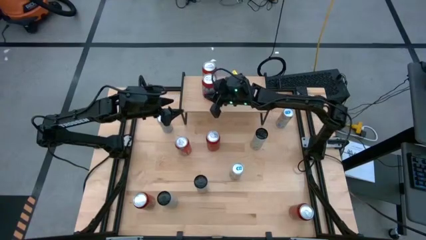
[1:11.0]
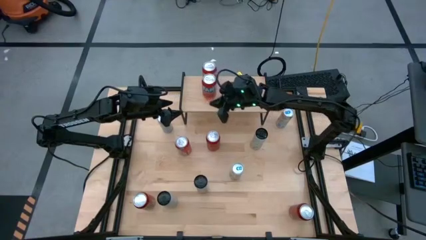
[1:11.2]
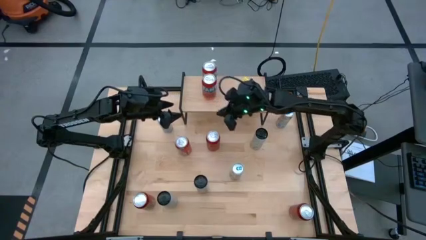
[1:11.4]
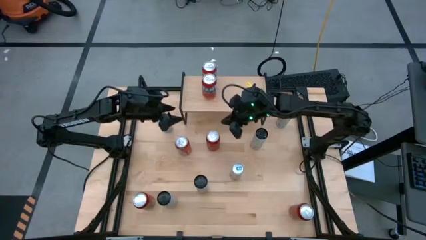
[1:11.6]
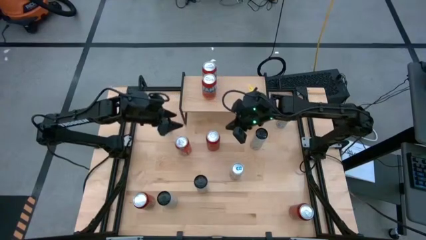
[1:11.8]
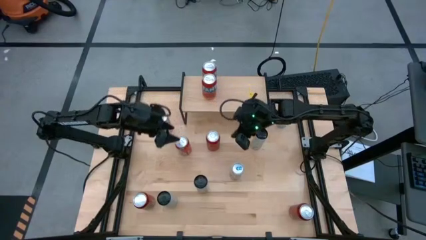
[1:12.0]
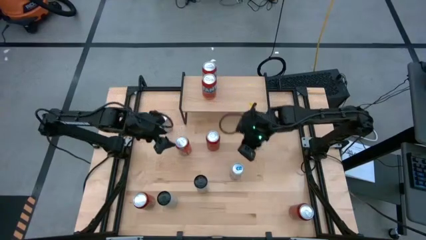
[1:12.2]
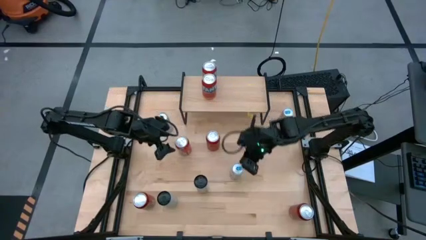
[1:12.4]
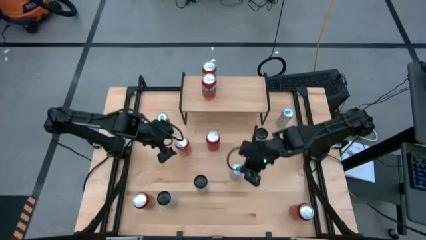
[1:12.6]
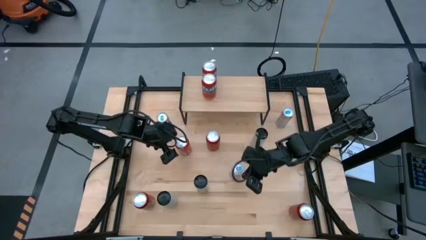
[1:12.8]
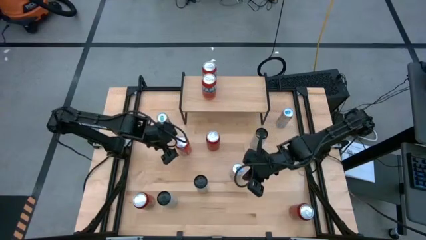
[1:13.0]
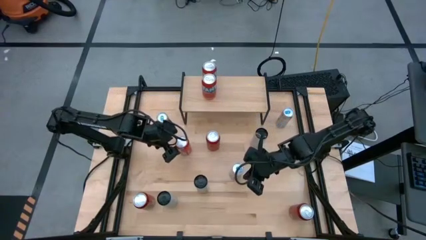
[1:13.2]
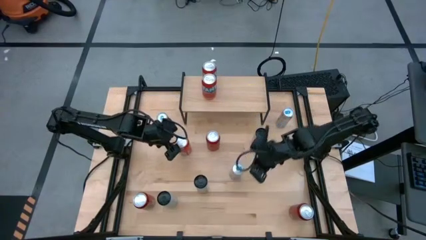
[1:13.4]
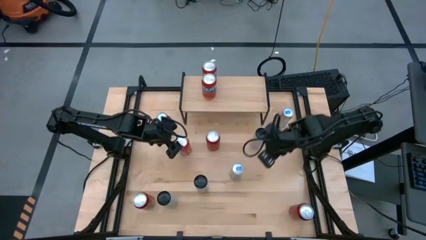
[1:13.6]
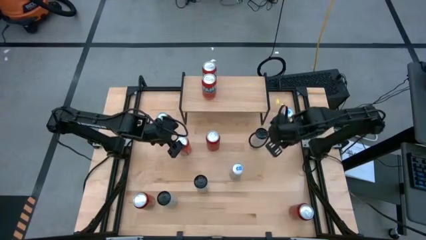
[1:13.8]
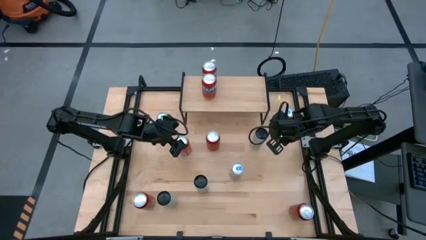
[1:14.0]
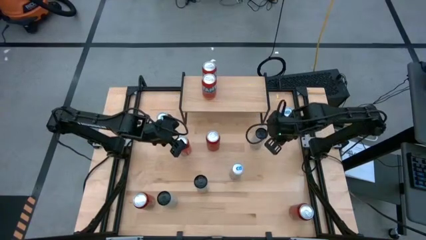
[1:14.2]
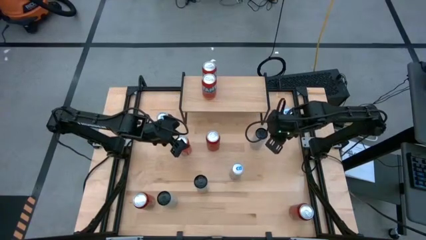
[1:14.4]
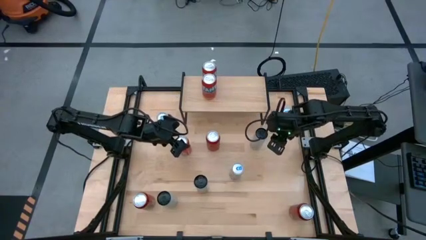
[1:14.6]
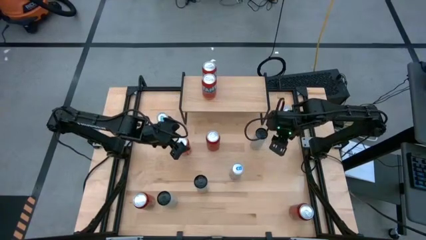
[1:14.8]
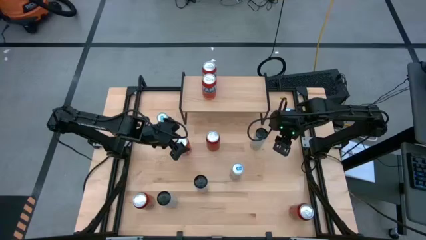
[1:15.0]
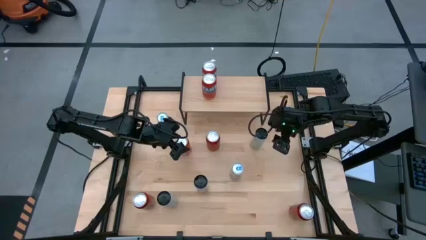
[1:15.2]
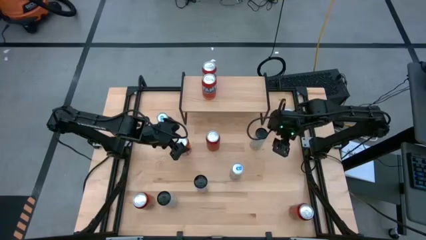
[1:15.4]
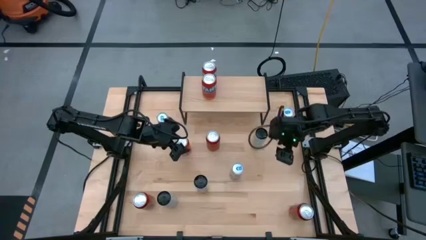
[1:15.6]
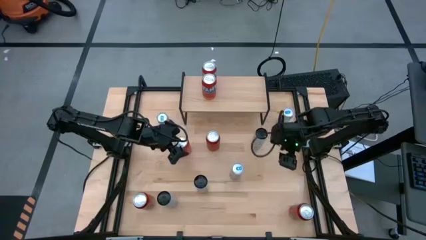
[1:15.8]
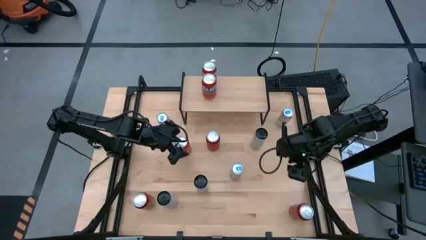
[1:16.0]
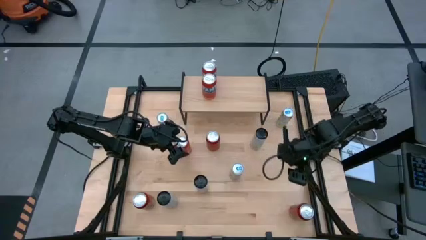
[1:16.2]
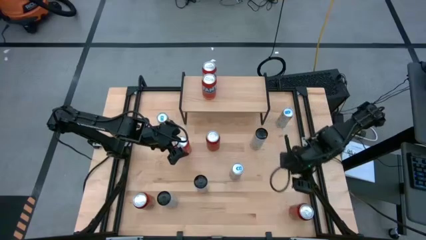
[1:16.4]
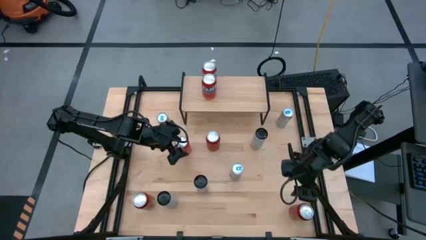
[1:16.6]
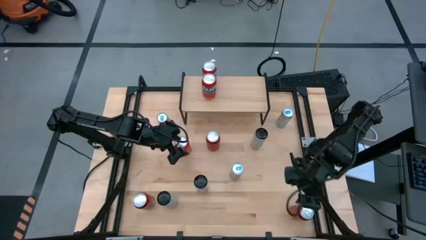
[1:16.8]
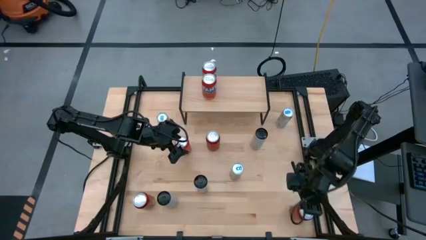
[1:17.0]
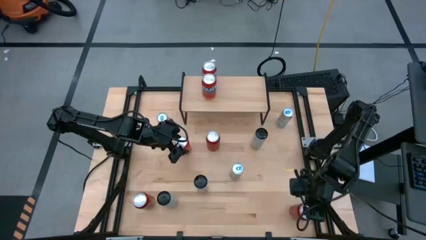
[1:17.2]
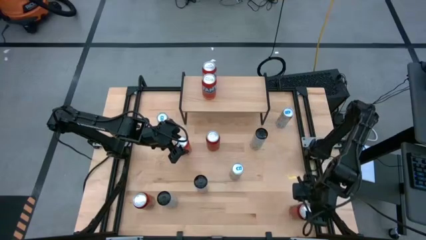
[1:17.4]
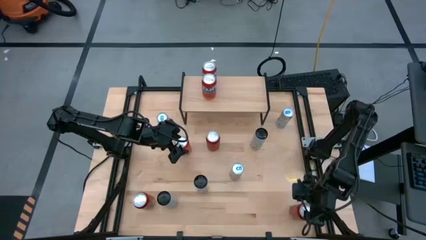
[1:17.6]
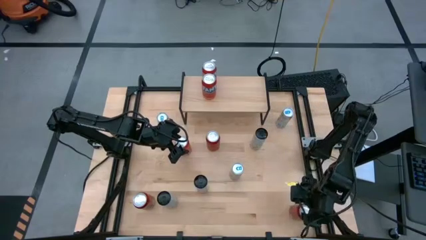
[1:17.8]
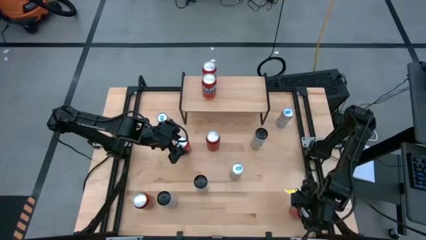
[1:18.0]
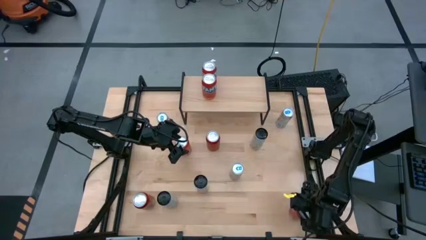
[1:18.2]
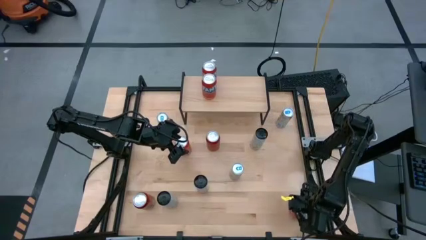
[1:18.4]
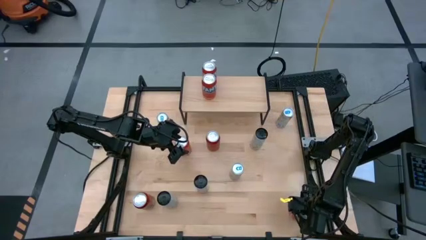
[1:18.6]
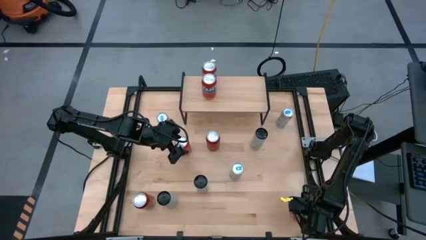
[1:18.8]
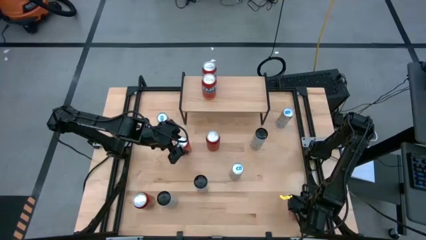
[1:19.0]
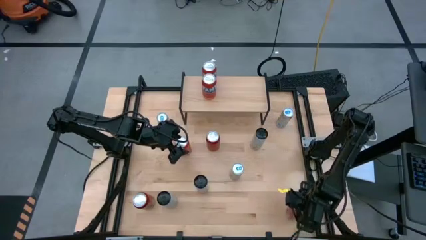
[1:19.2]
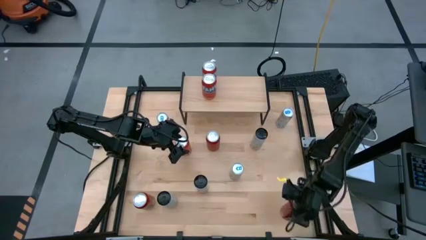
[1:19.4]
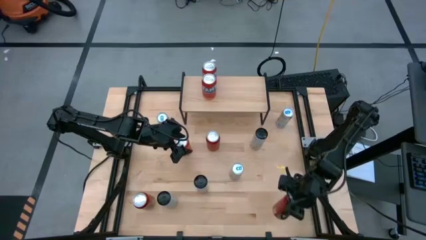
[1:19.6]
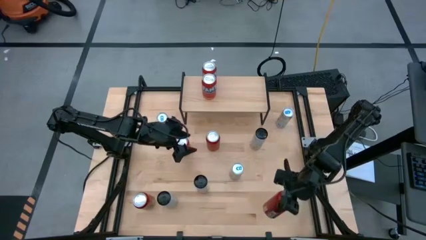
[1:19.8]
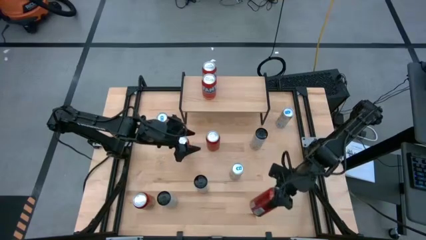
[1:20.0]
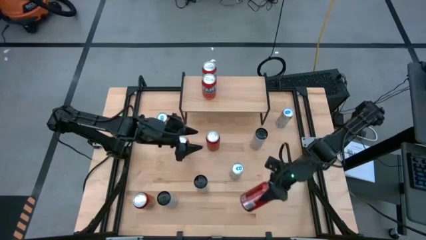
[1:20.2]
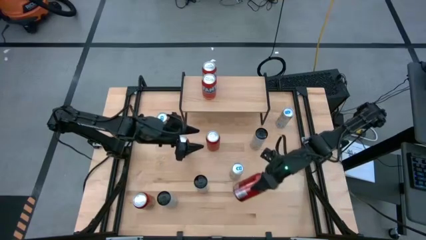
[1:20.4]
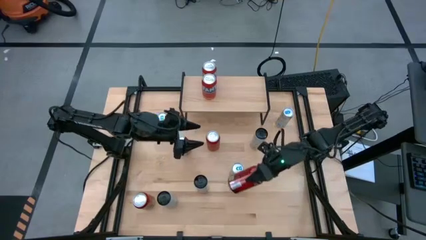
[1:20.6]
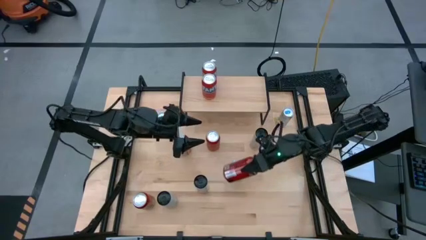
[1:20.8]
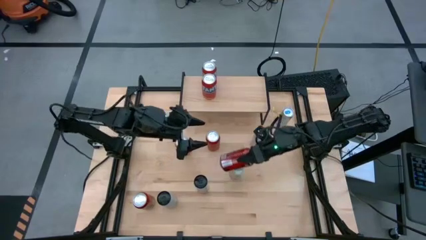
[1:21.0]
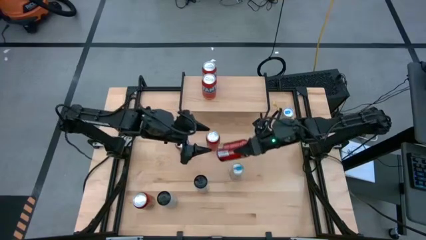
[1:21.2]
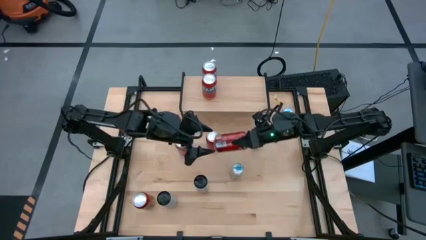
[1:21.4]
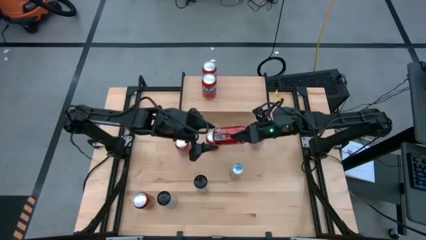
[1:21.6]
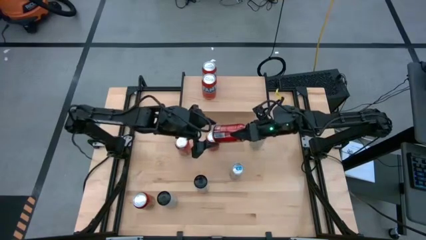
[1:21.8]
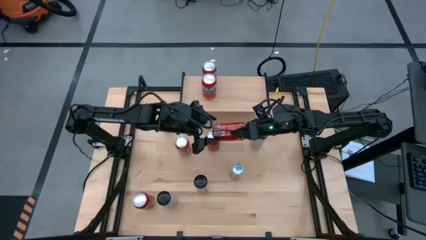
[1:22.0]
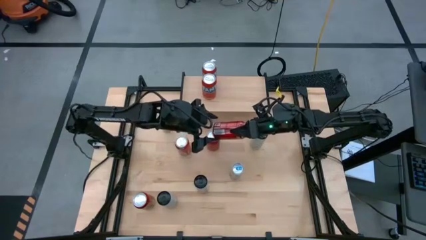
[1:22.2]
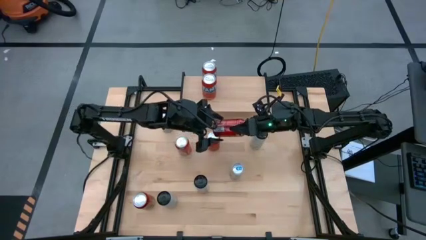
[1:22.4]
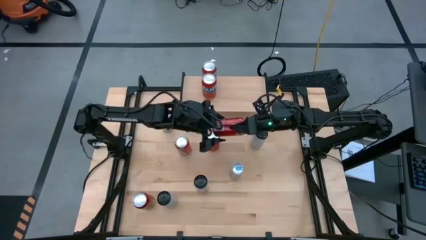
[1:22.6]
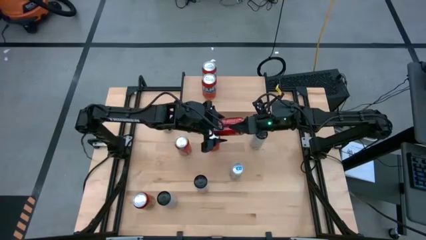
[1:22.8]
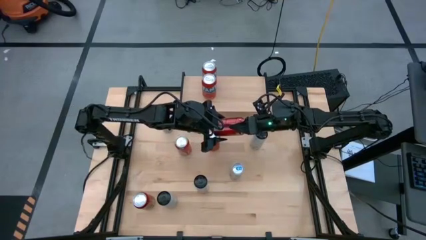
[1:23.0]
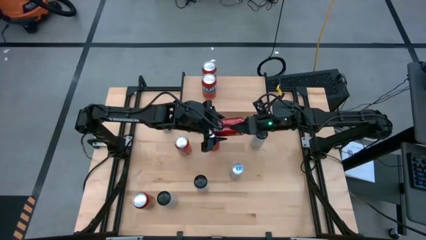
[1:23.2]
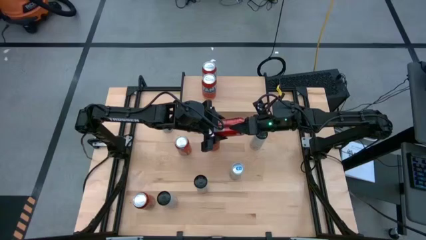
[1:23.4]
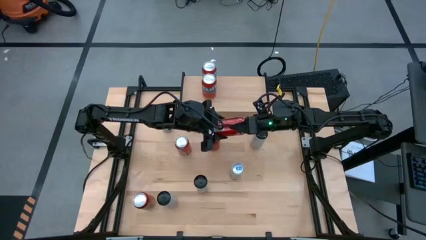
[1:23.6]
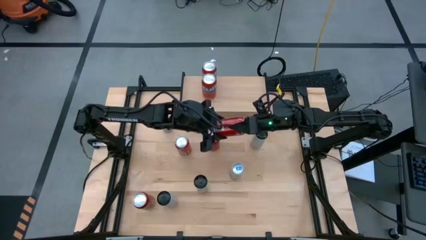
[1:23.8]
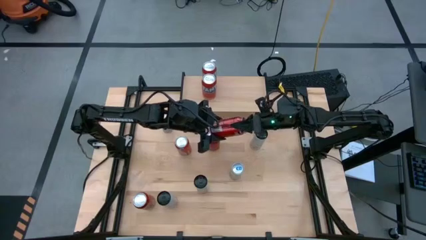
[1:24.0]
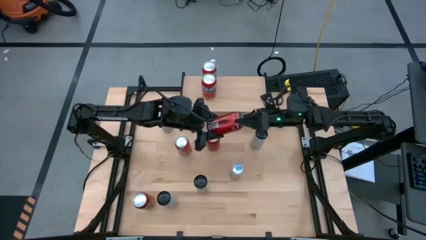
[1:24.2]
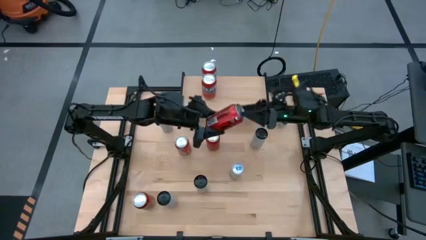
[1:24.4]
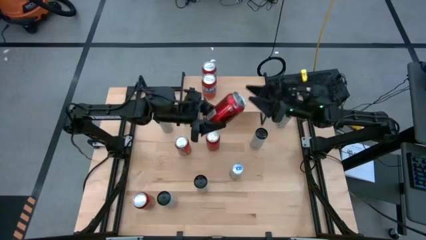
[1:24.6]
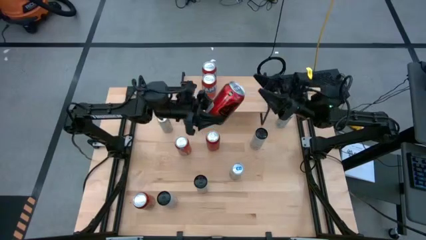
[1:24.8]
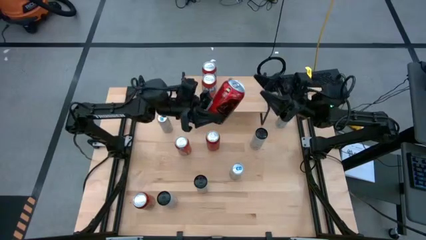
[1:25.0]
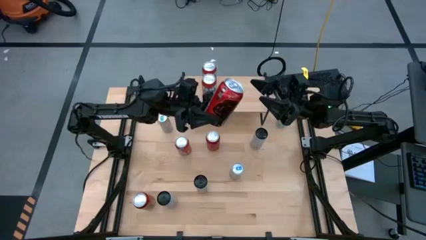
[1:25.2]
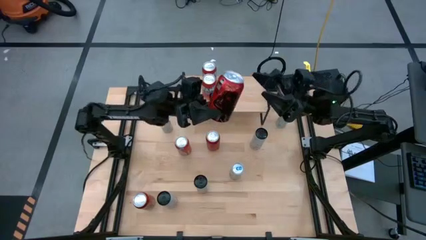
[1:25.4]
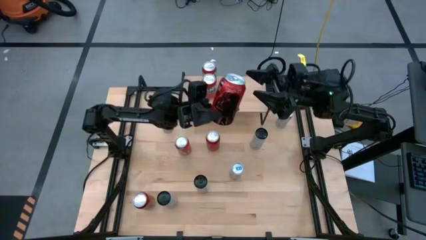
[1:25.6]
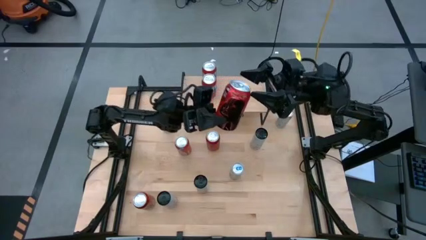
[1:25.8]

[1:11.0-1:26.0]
Task: Place canned beverage on shelf
Put the bottom right red-black soda can on the shelf

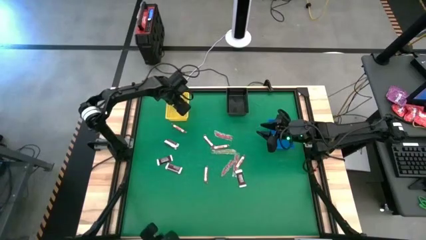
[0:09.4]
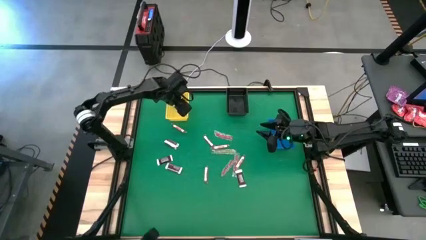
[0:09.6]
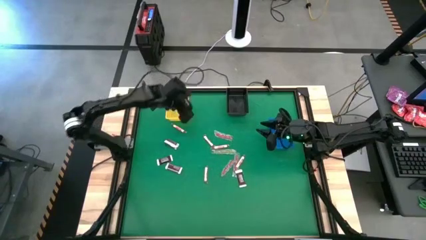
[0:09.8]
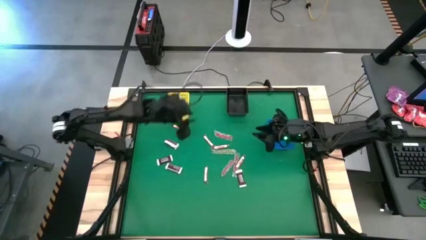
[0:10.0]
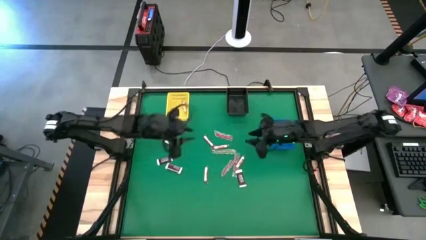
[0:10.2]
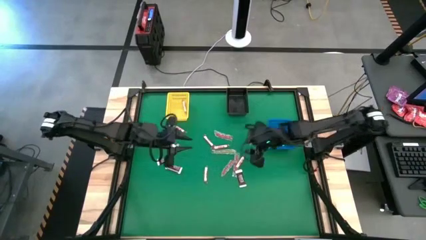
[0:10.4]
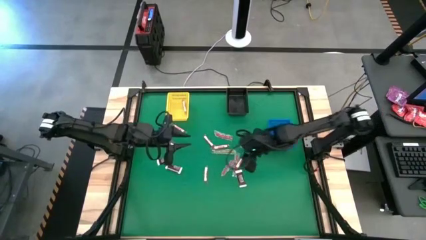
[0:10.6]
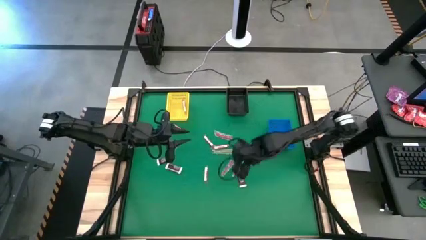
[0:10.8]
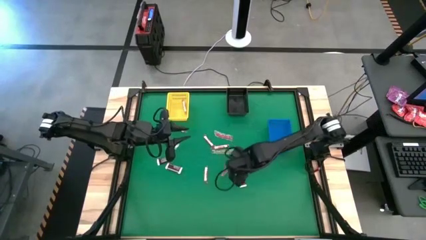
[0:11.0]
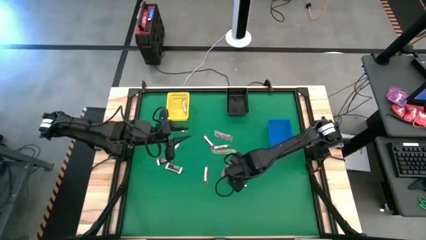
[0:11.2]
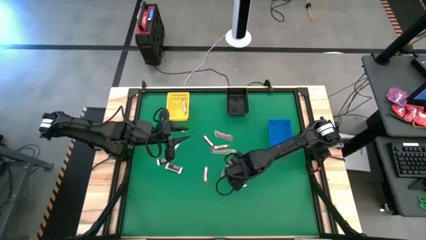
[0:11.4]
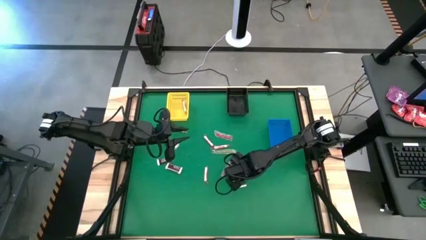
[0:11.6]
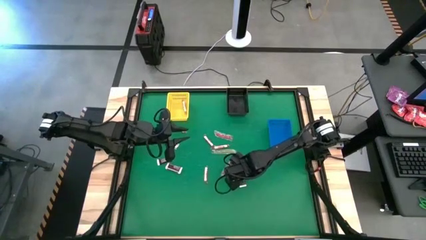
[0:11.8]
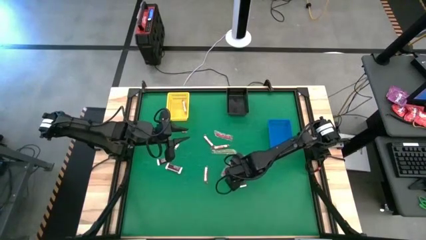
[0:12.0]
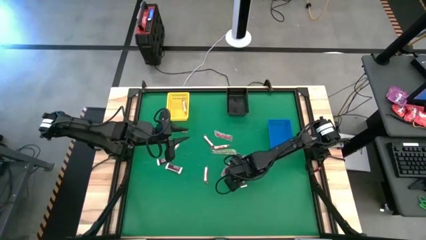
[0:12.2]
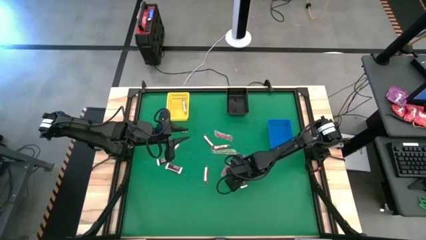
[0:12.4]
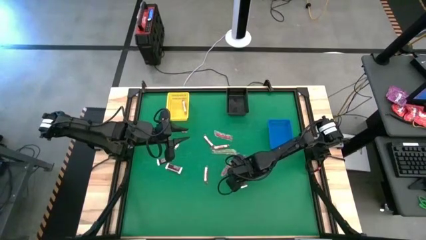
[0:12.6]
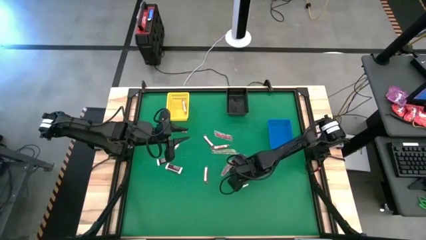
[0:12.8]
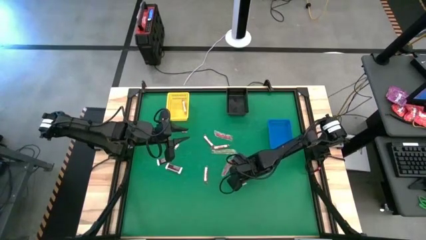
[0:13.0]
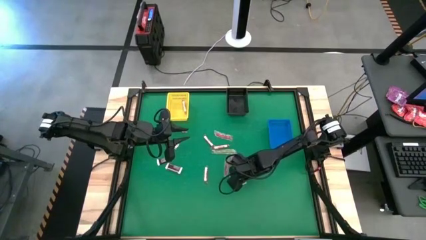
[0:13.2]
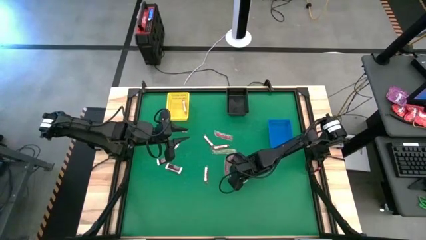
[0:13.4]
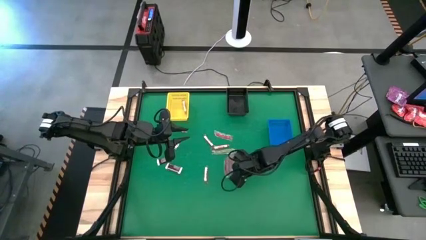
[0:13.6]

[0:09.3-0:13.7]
Task: Sort candy by brand, put in halloween buckets
Put the brown chocolate into the blue basket
